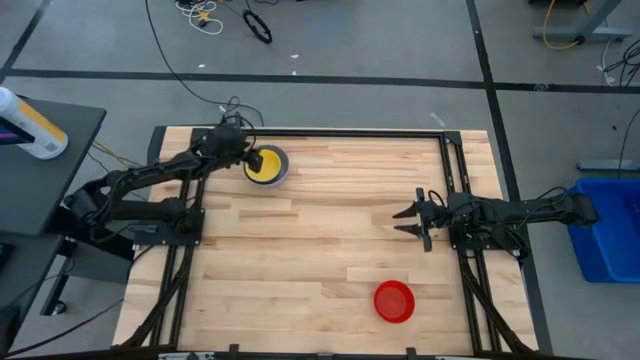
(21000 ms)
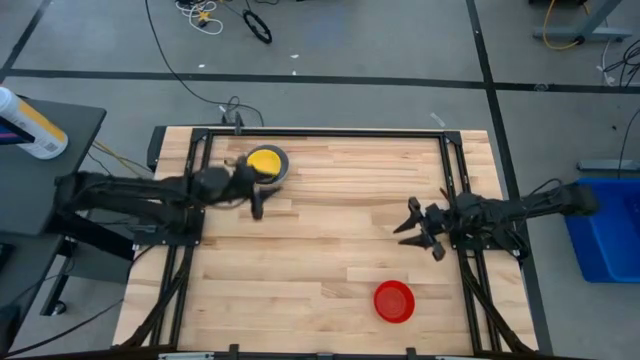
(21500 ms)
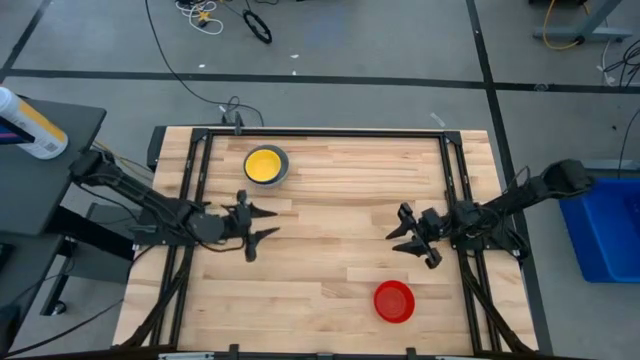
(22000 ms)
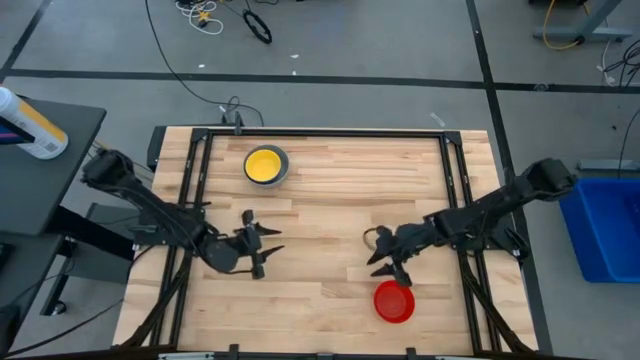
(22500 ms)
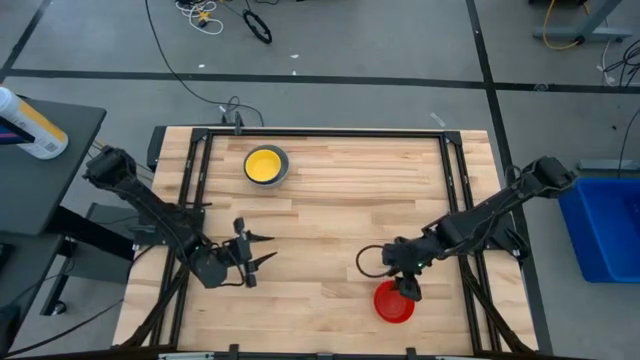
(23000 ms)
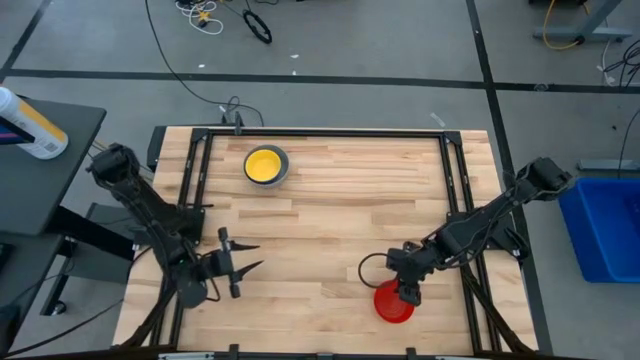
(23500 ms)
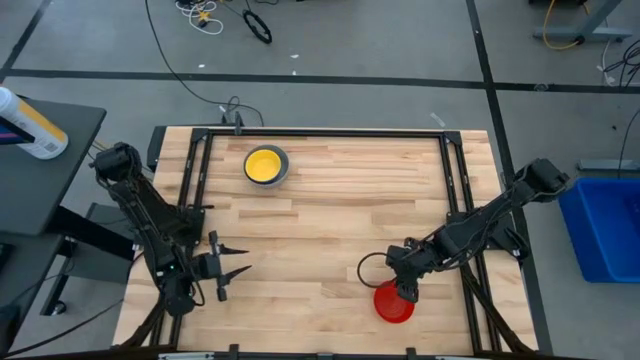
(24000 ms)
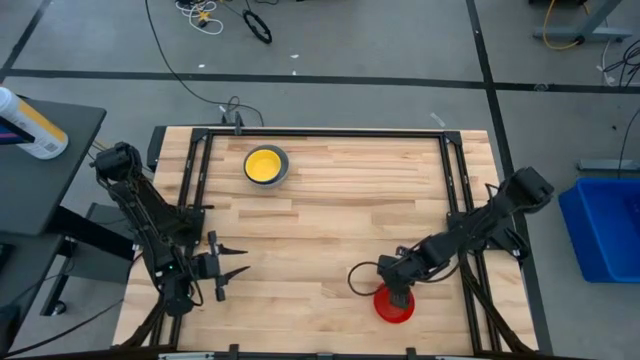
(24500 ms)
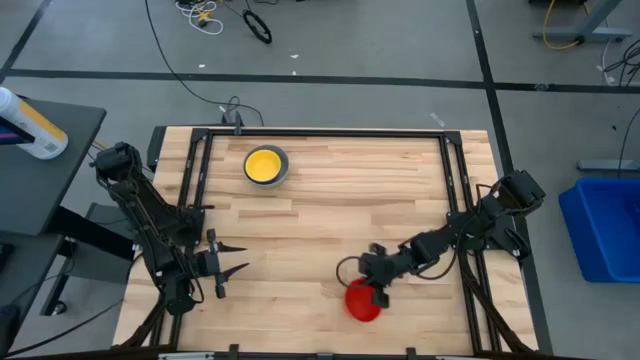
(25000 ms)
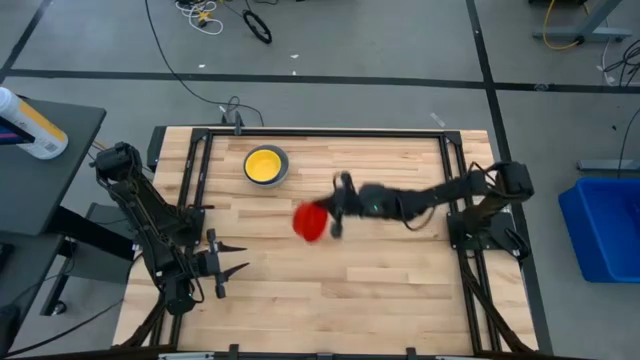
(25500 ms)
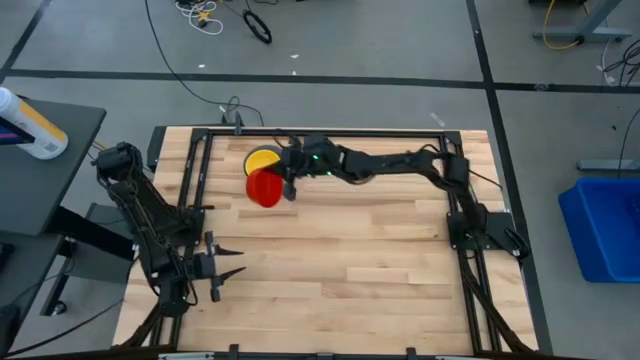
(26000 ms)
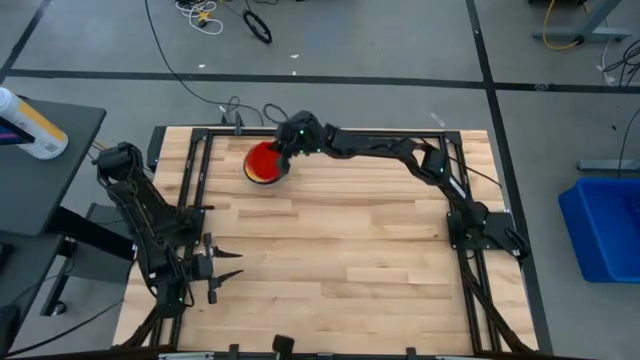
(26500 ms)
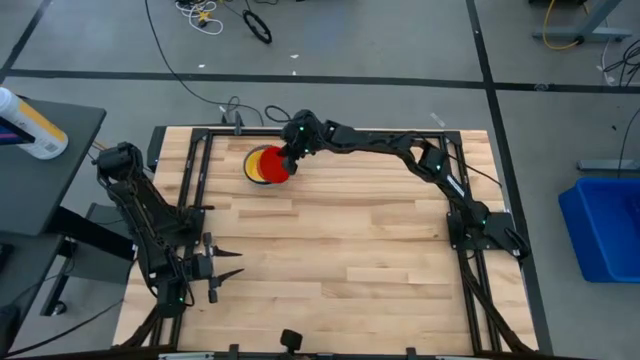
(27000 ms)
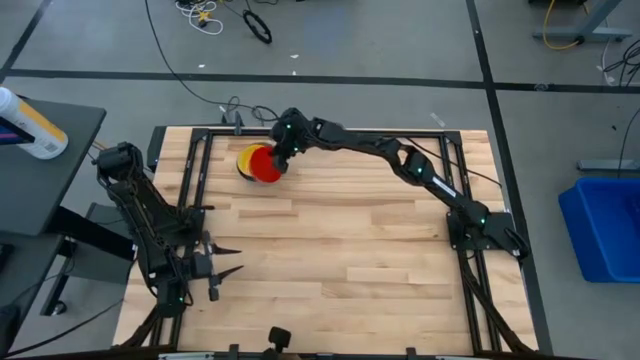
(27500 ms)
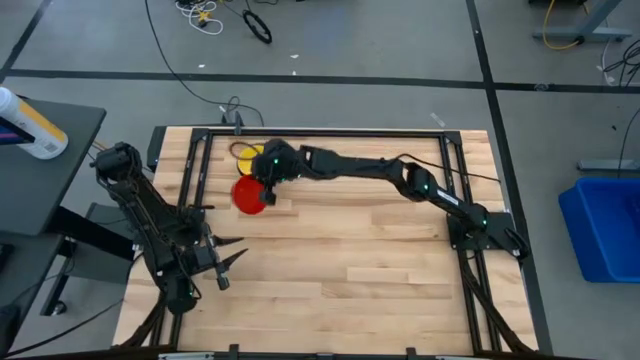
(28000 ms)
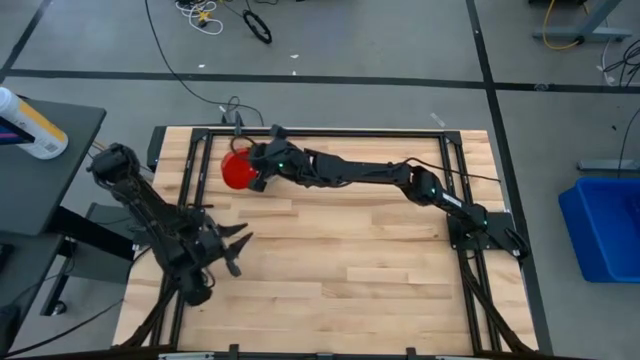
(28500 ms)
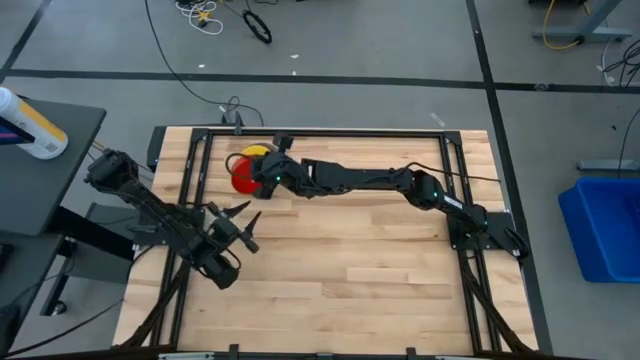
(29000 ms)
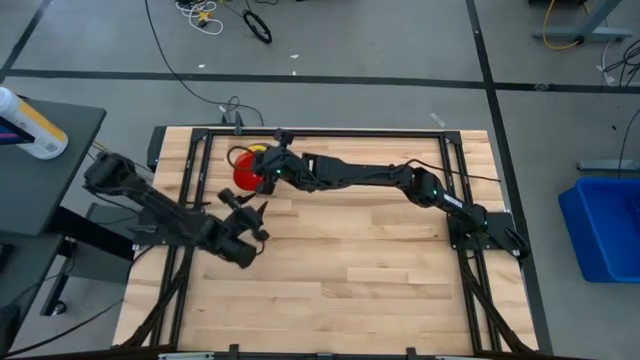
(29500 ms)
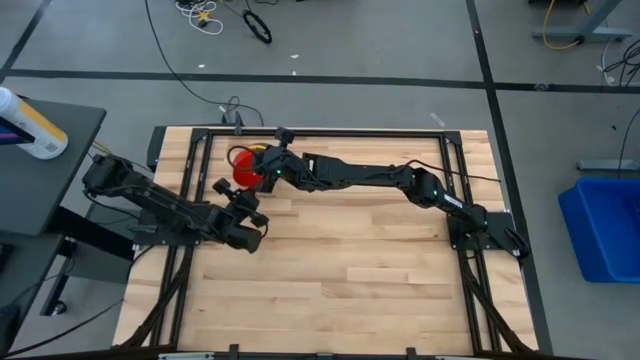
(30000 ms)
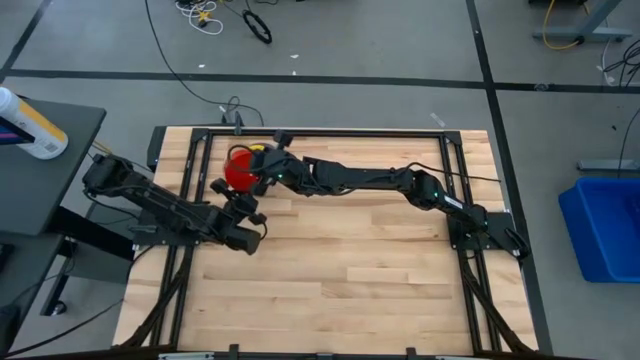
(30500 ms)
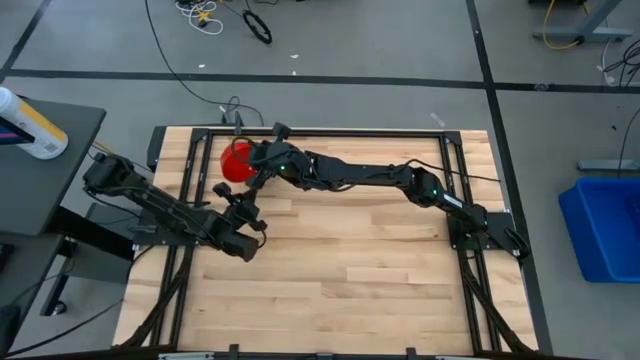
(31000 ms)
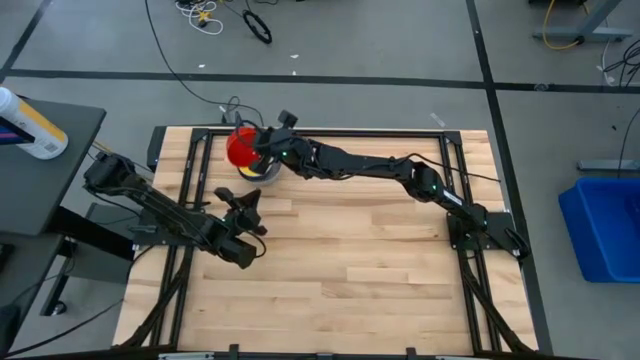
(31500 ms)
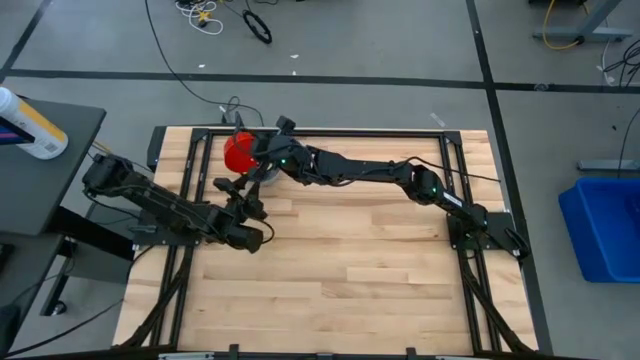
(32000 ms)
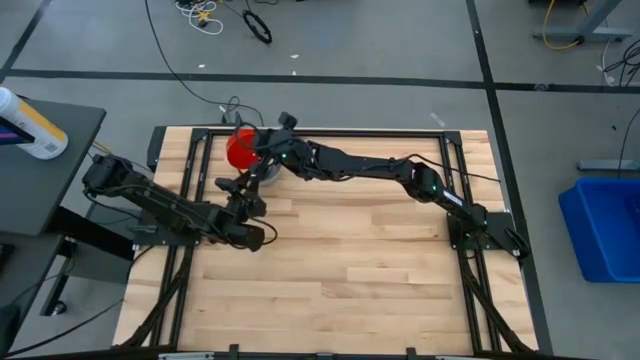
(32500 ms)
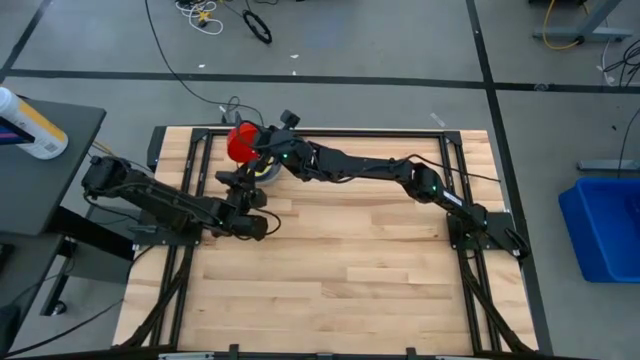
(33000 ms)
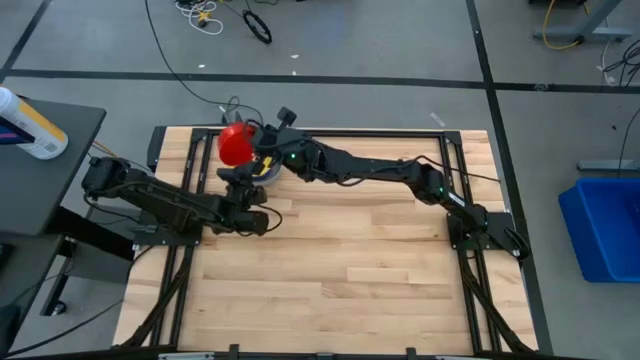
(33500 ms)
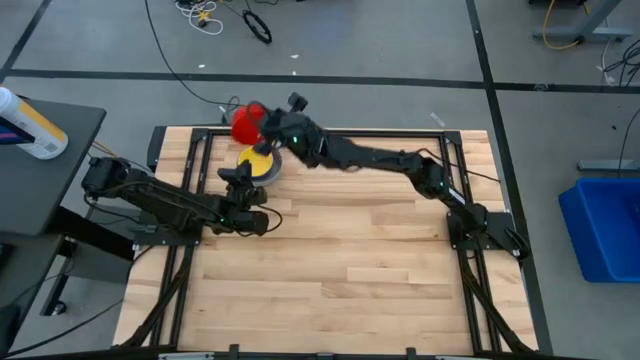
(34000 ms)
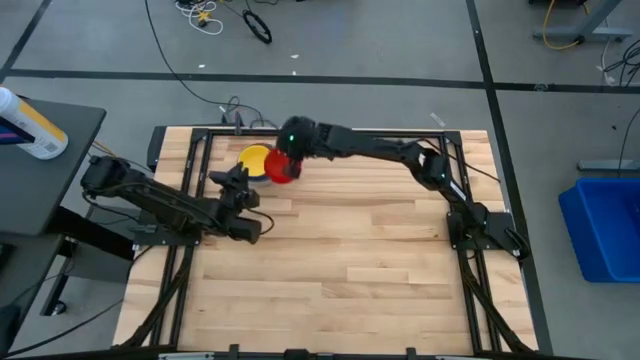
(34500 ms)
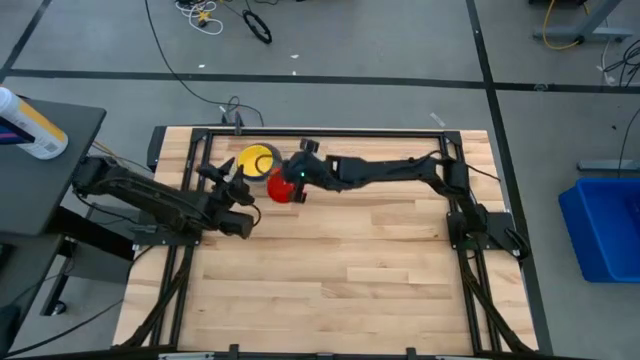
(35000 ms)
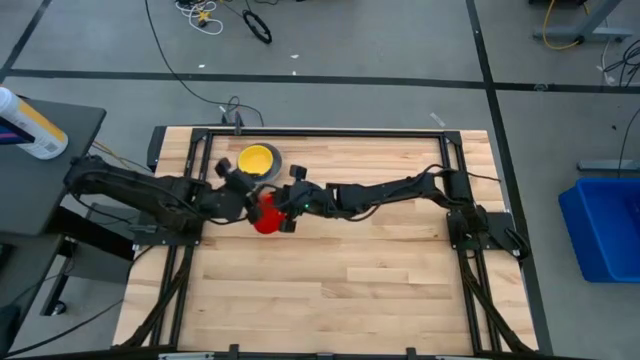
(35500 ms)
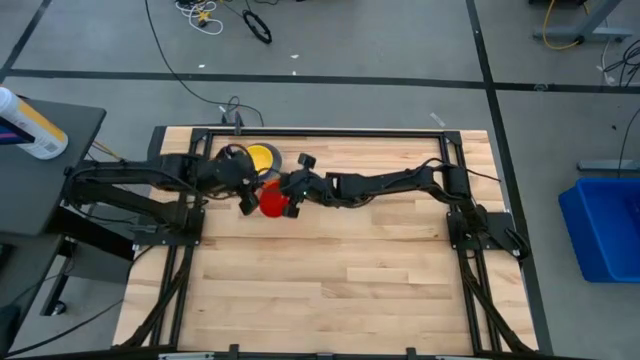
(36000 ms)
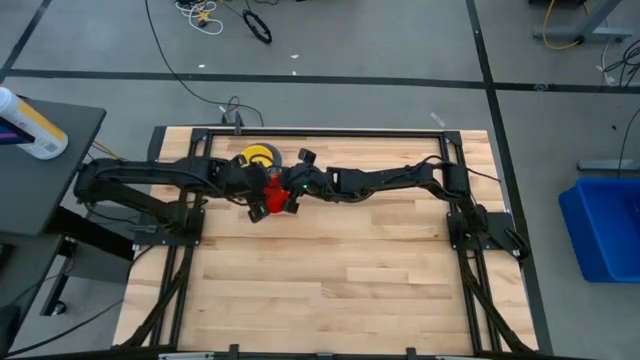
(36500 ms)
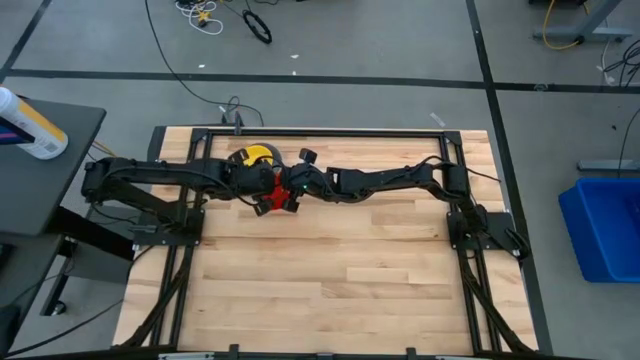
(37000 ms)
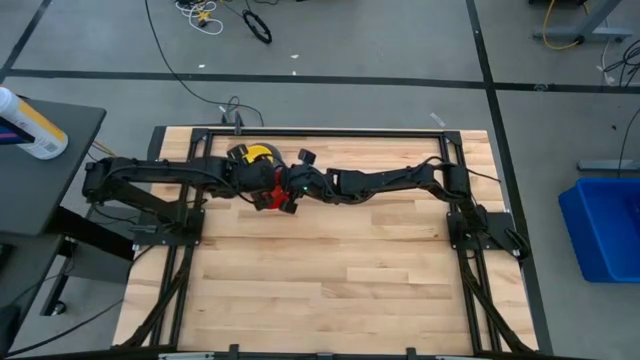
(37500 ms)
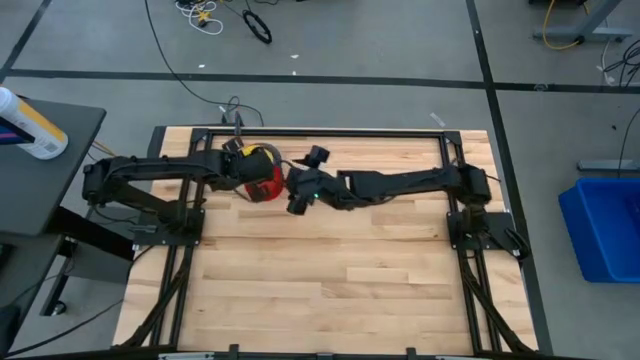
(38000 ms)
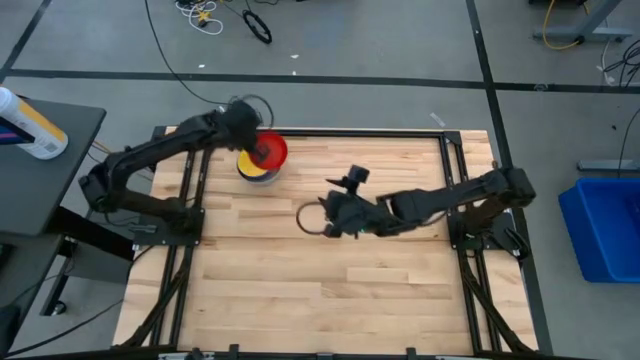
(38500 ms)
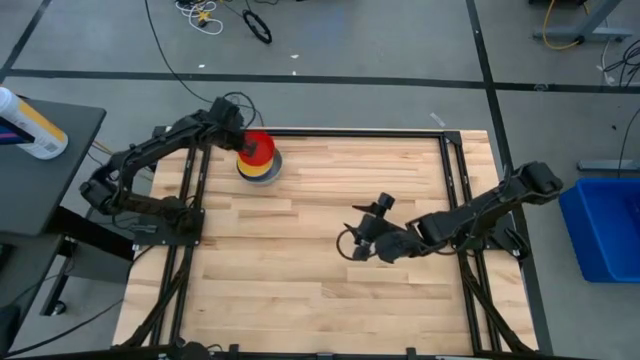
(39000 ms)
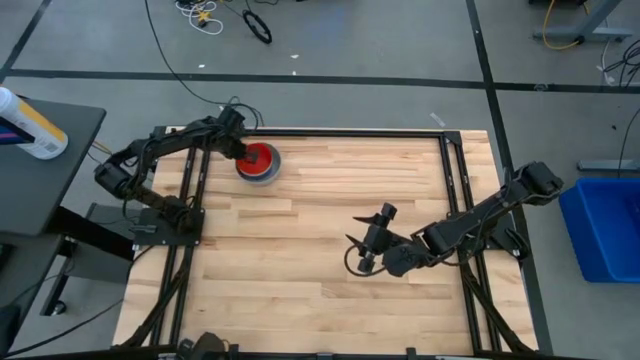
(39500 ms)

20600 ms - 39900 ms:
Stack the red bowl on the yellow bowl
